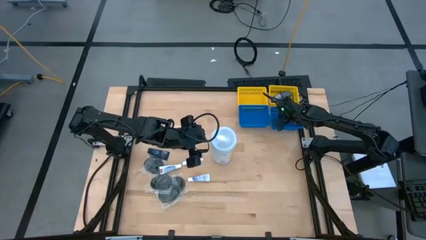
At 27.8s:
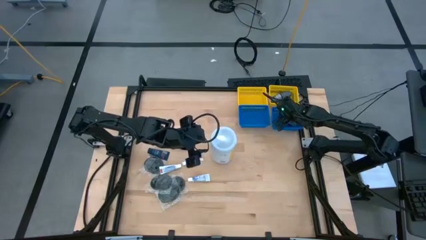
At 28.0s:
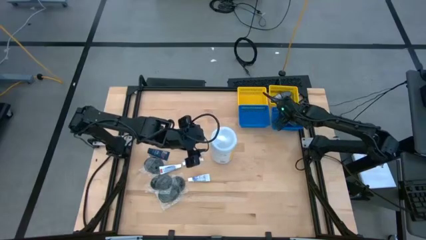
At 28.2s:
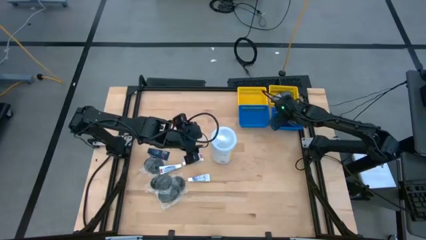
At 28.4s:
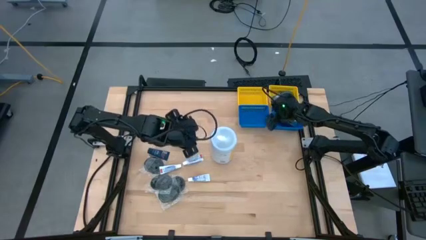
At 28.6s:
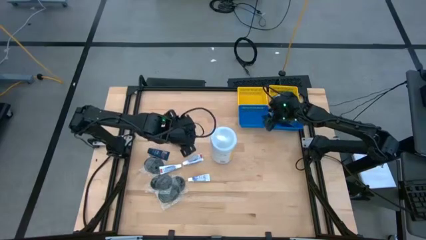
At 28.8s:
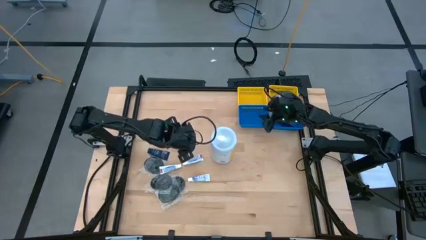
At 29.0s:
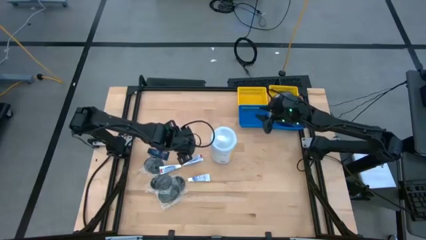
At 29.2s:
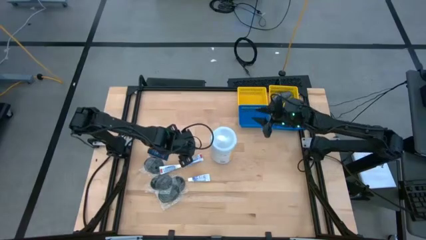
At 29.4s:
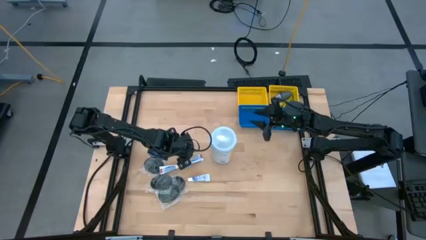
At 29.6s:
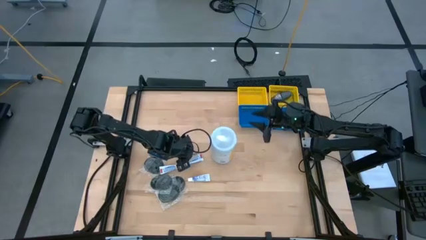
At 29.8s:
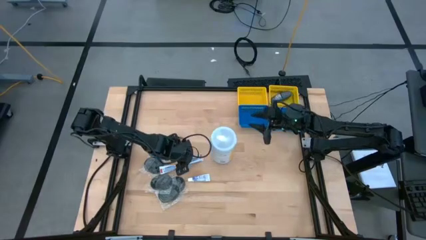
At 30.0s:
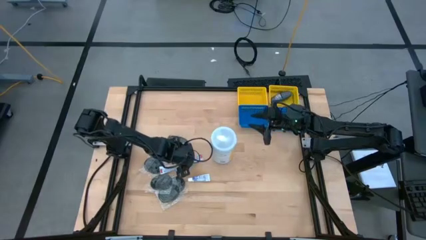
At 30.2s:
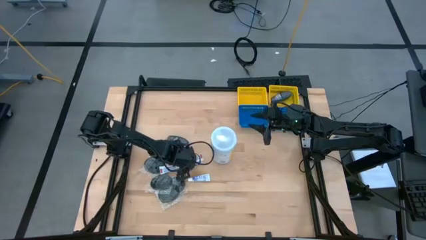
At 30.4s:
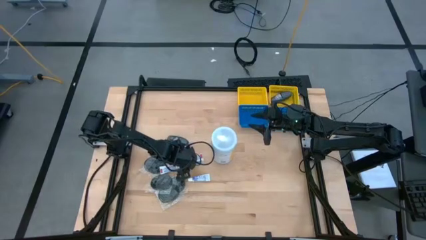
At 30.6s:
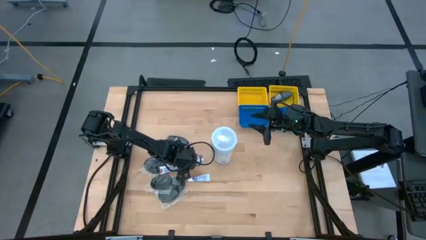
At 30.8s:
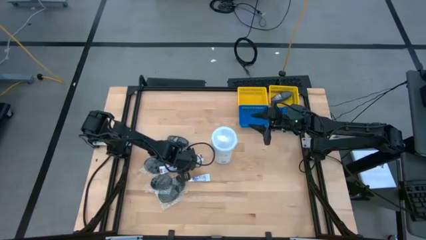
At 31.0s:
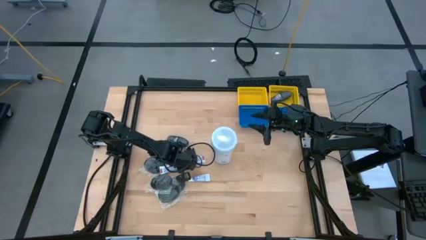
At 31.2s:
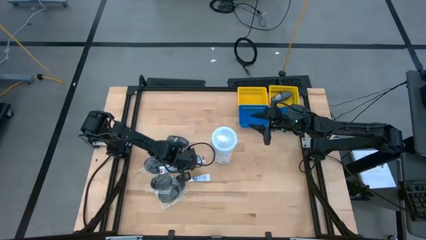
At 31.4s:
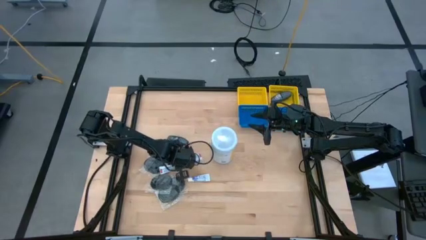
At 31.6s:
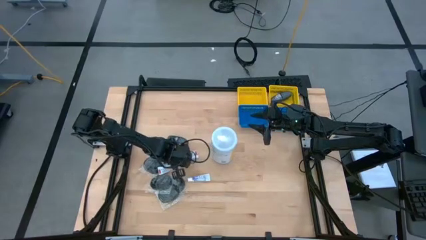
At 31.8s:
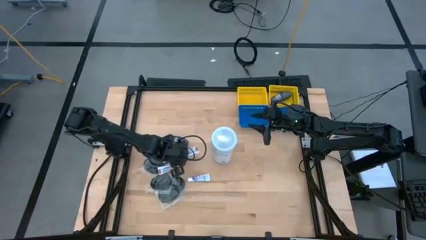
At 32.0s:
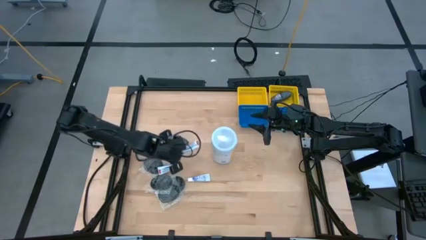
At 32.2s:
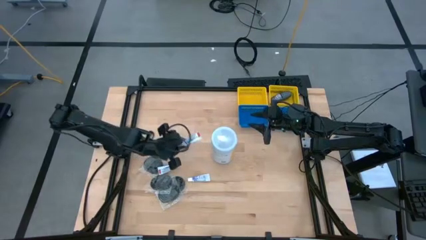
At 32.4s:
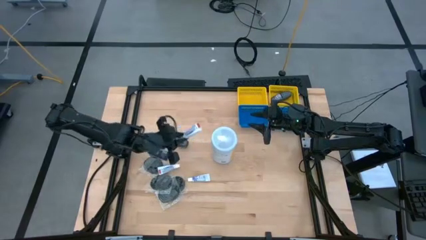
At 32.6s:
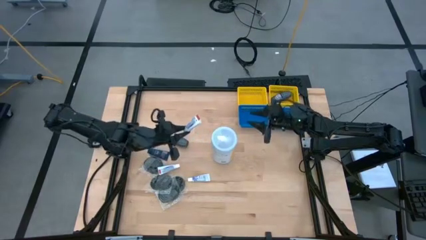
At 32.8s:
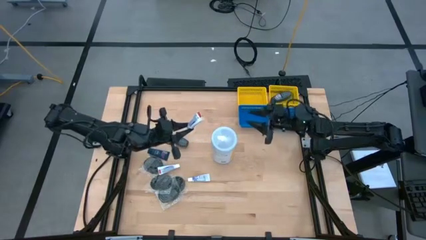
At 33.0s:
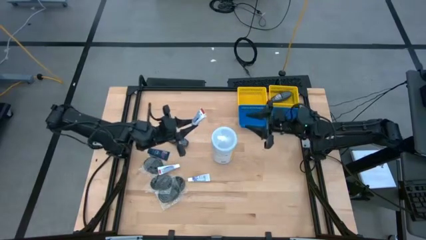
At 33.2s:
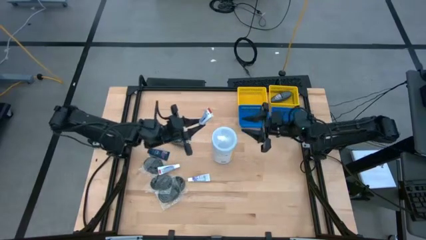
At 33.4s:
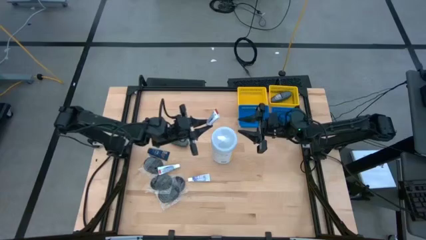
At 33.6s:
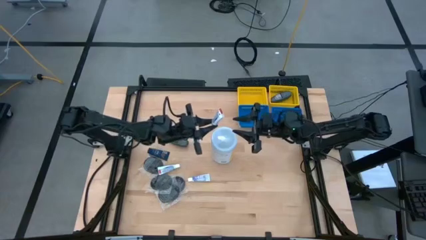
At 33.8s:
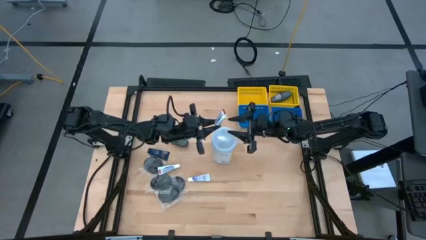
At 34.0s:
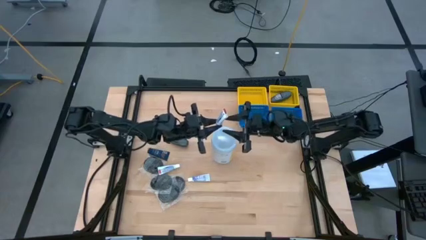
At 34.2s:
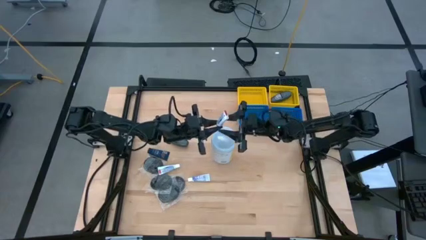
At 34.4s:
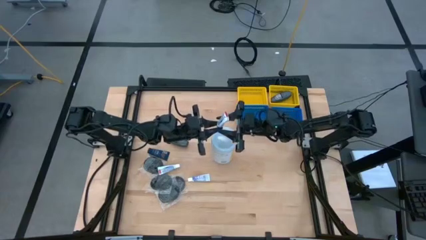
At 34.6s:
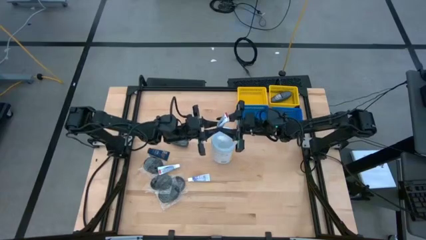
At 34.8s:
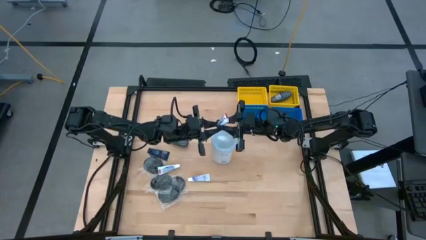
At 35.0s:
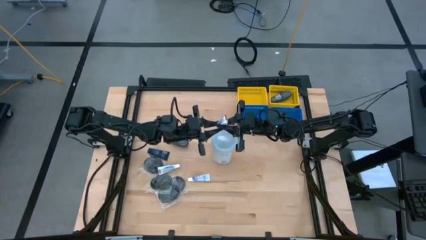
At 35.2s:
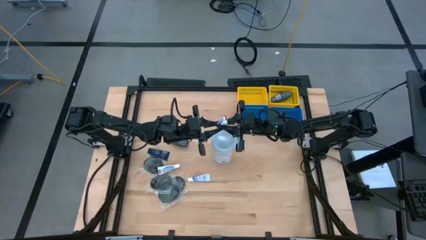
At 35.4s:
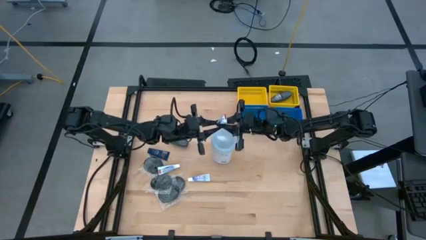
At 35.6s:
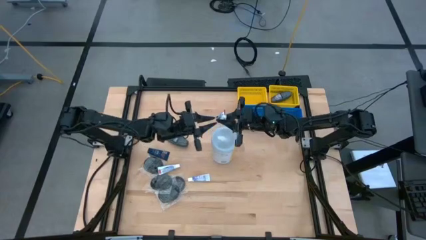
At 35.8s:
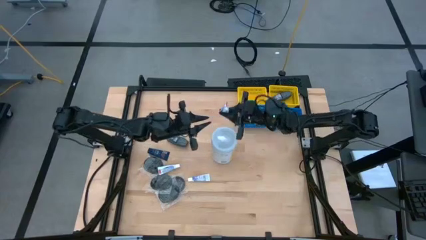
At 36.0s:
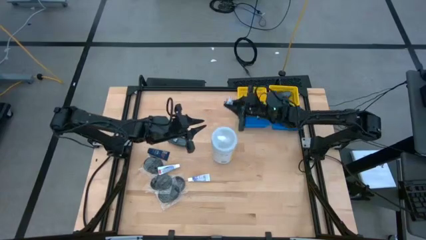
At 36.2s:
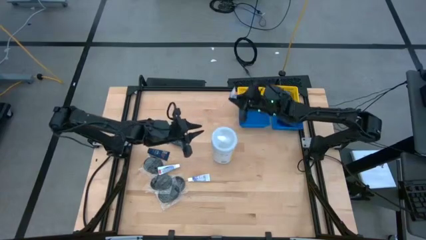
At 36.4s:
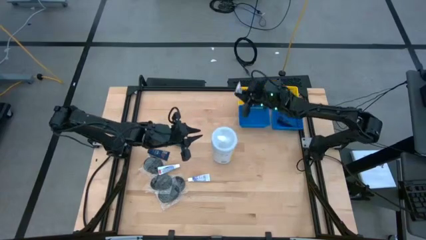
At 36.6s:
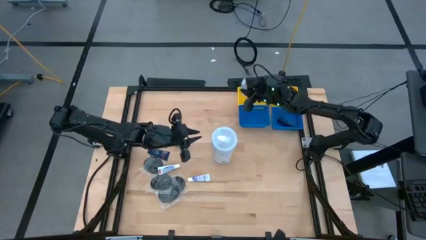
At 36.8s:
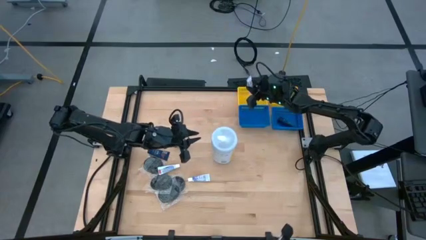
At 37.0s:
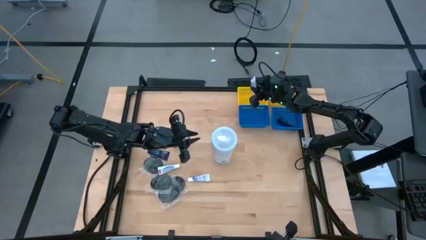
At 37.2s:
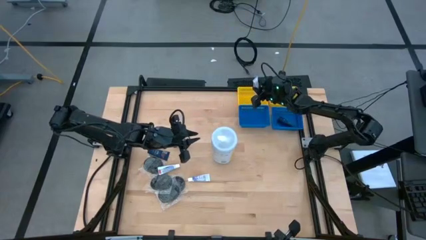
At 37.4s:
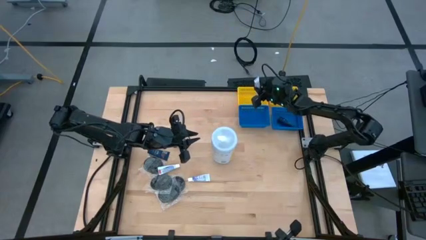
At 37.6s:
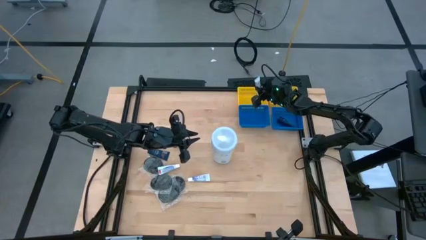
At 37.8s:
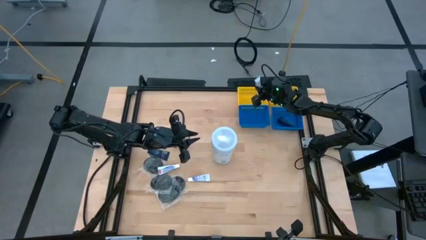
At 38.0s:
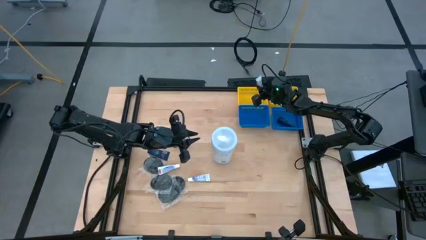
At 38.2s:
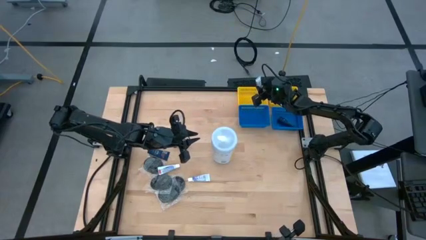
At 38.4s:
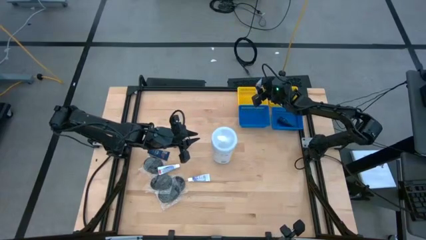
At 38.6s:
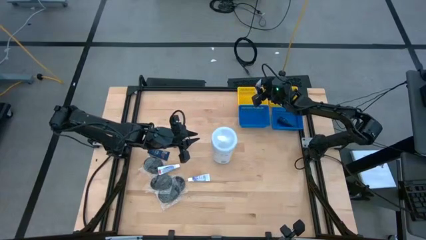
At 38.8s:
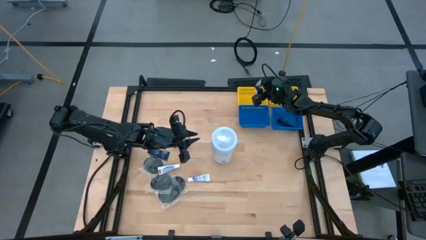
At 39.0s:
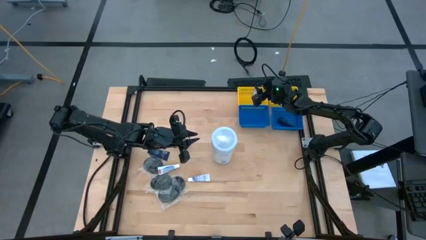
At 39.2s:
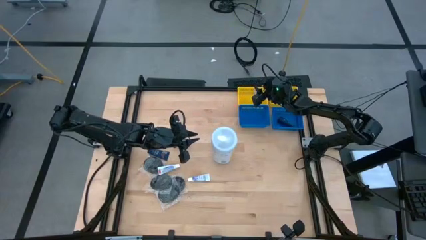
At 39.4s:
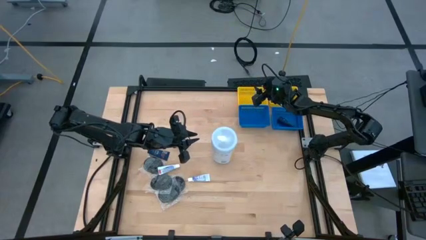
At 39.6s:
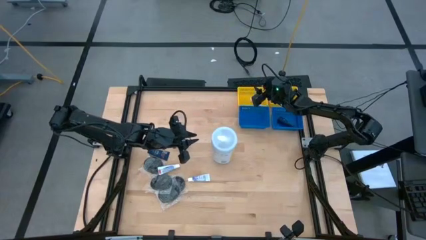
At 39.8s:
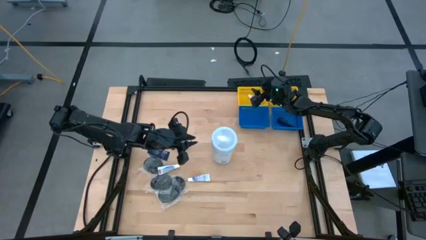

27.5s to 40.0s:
Task: Pick & Place Travel size toiletries
Put the white toothpaste into the left yellow bin

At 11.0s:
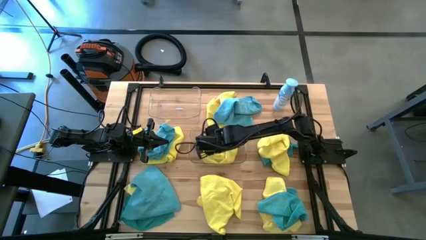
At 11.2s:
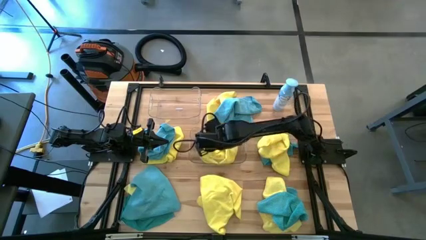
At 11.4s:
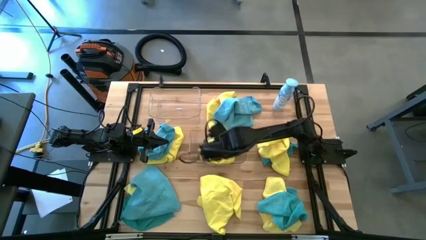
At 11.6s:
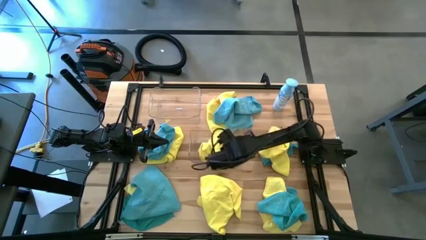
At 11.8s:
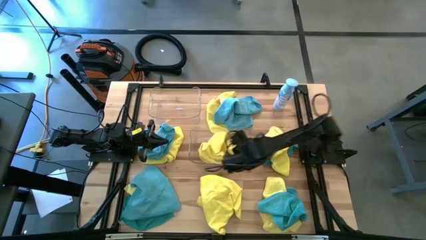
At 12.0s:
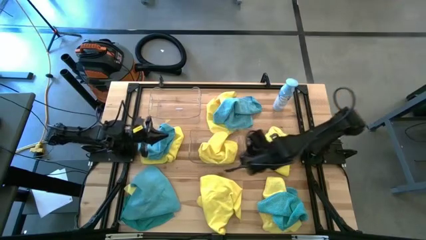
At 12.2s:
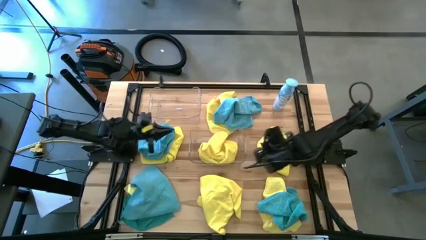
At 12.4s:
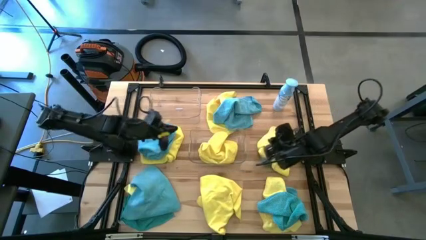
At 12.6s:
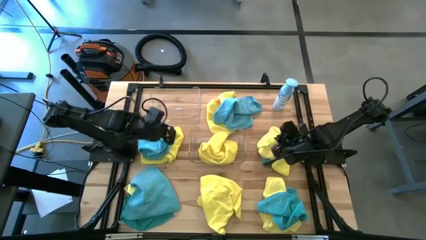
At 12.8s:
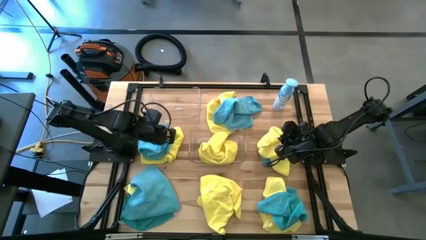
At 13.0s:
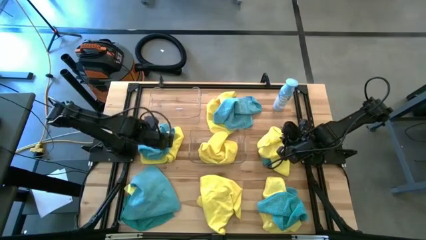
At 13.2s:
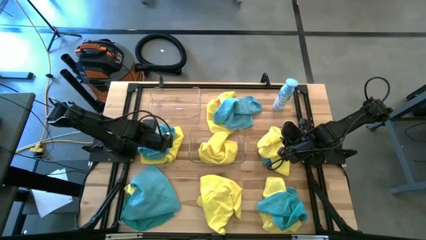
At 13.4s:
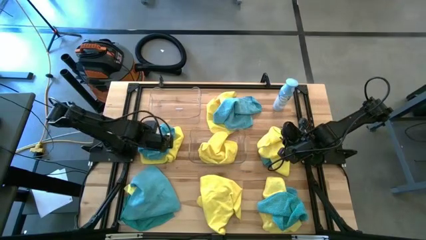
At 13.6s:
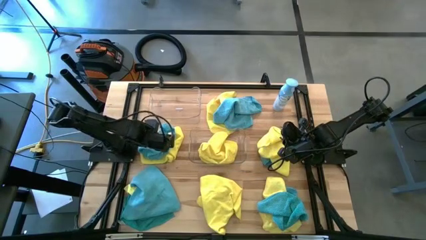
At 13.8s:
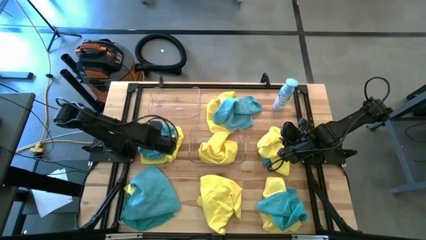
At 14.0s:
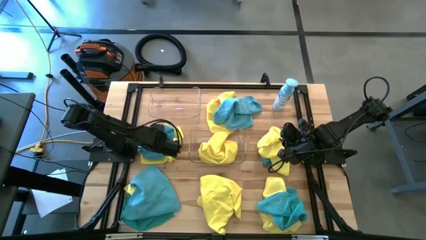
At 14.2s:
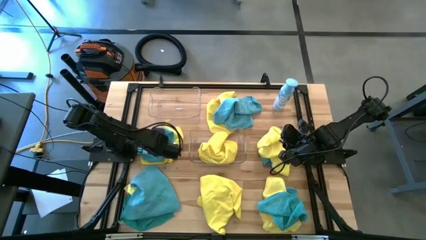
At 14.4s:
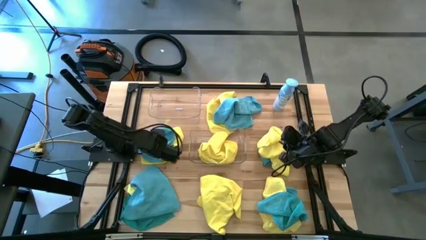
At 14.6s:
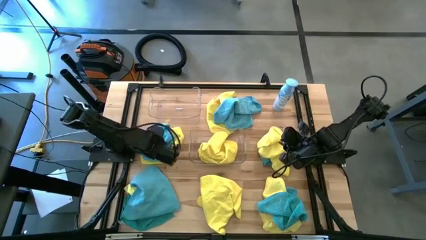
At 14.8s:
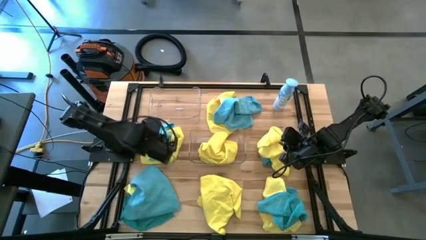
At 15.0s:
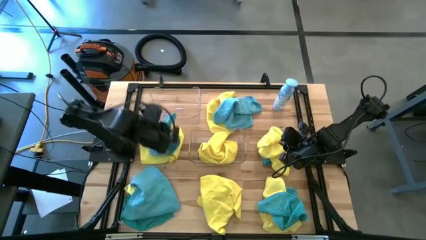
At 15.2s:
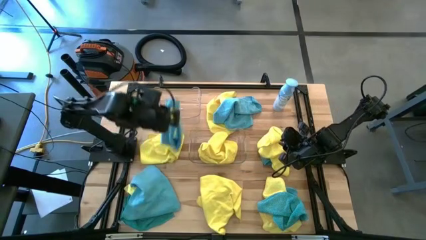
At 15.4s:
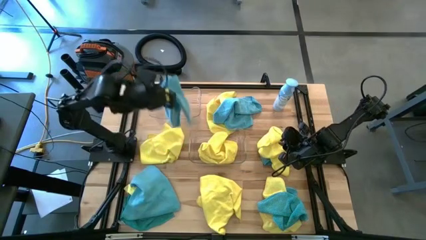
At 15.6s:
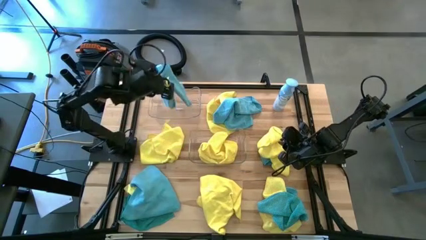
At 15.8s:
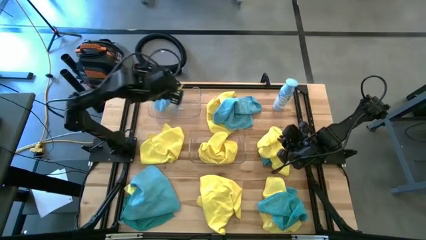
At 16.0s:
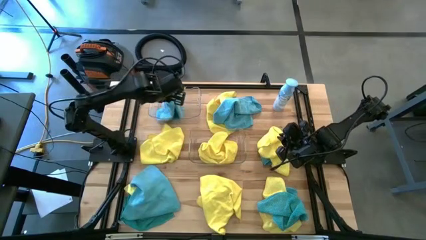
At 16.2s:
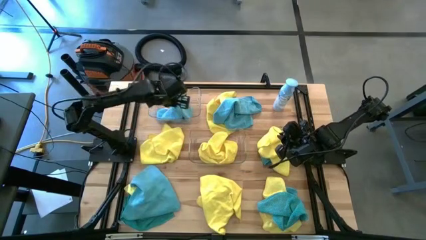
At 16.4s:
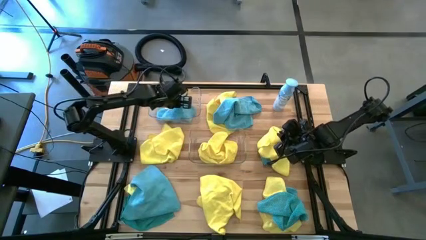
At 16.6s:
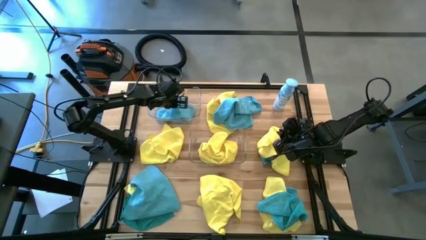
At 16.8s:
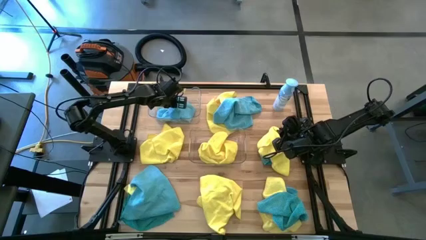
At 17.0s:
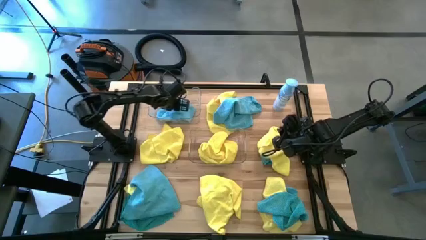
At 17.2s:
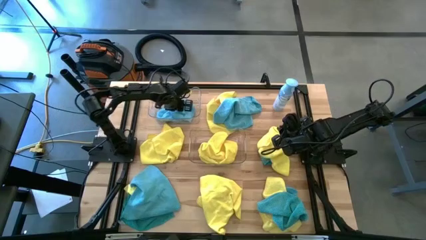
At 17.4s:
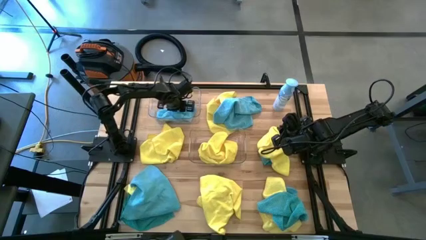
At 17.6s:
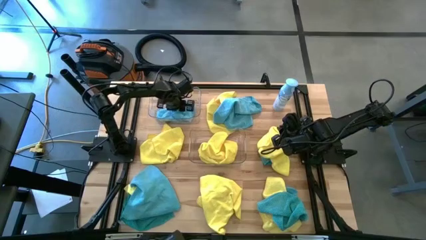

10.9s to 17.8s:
Task: Sort microfiber towel by color & place in baskets
Put the blue towel into the top transparent bin
